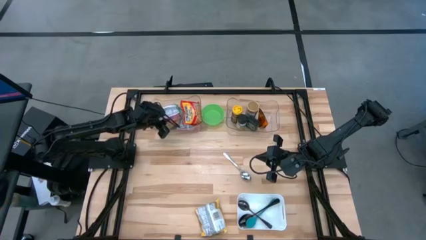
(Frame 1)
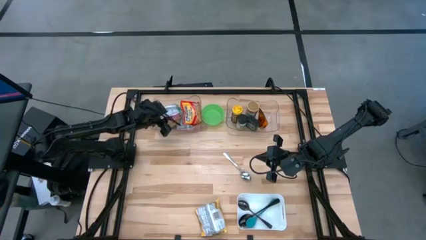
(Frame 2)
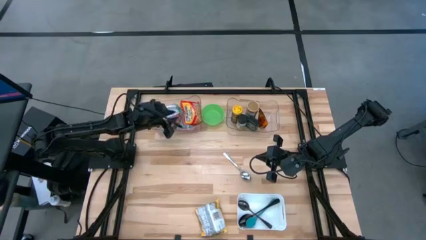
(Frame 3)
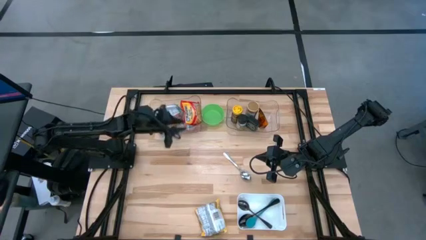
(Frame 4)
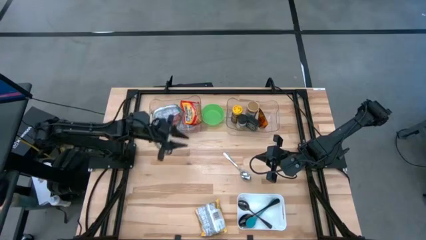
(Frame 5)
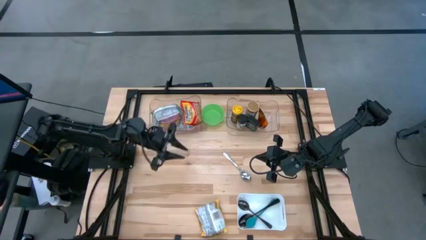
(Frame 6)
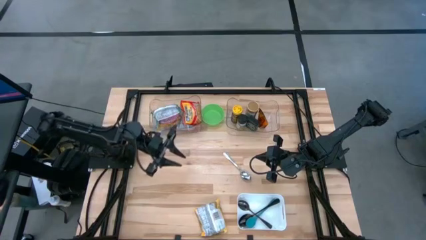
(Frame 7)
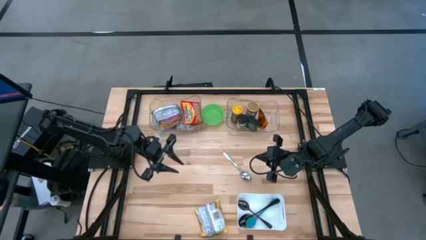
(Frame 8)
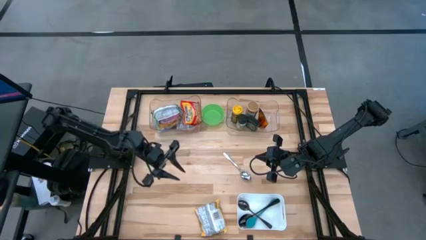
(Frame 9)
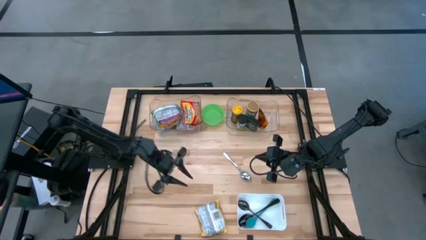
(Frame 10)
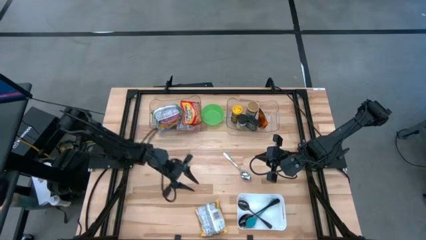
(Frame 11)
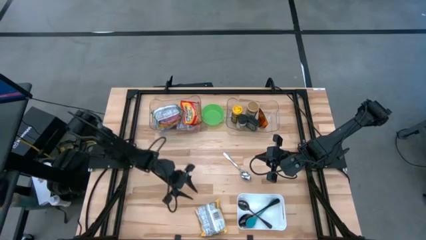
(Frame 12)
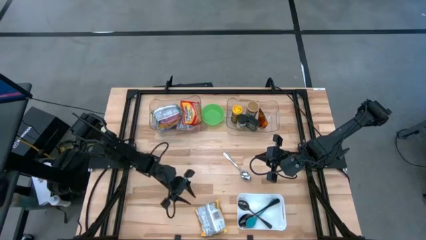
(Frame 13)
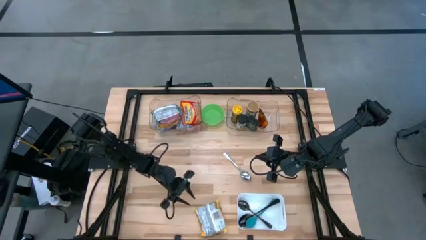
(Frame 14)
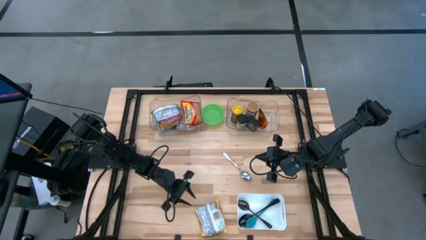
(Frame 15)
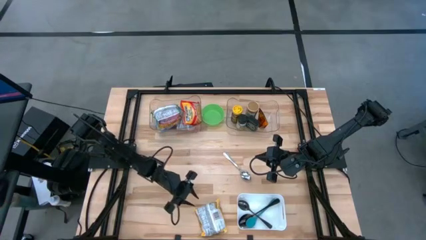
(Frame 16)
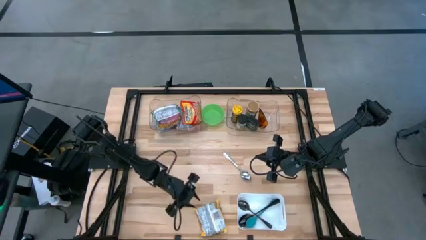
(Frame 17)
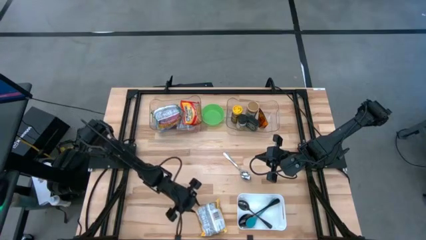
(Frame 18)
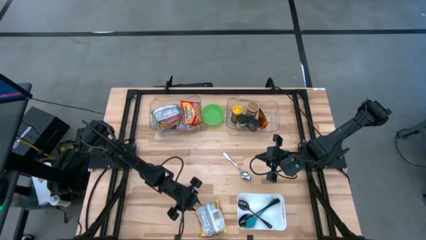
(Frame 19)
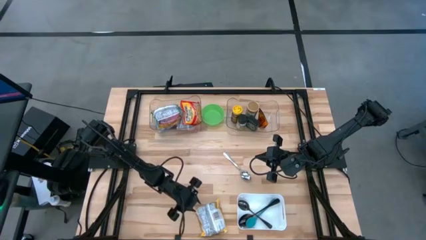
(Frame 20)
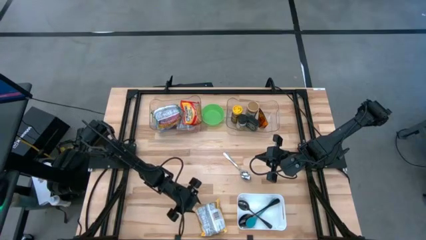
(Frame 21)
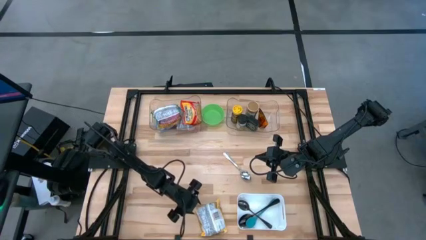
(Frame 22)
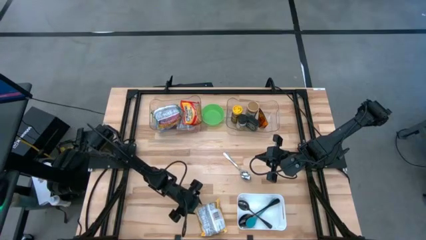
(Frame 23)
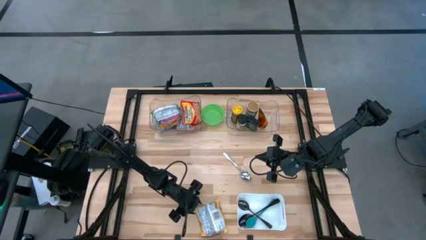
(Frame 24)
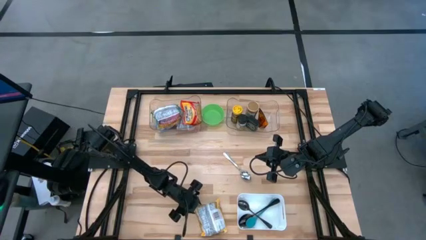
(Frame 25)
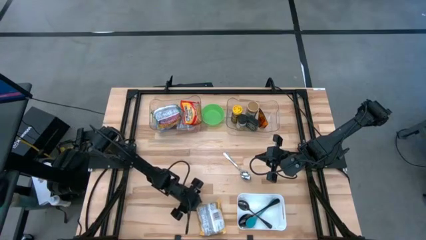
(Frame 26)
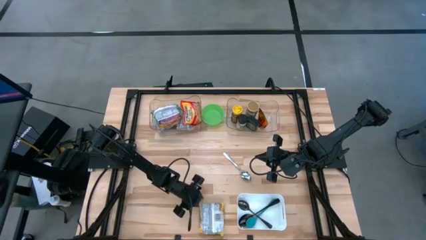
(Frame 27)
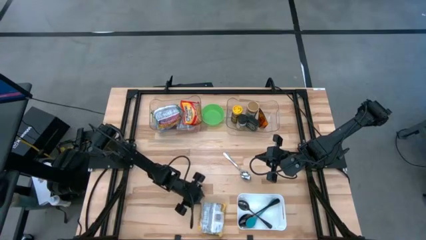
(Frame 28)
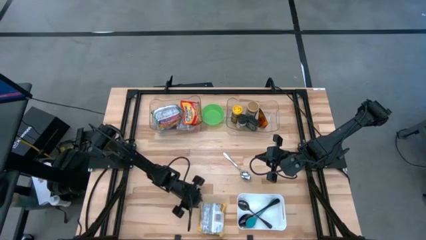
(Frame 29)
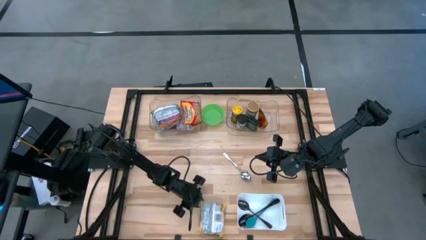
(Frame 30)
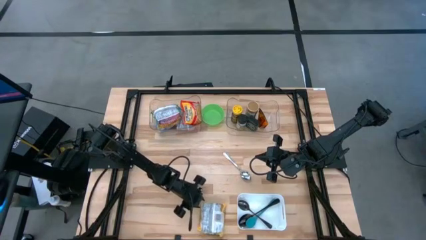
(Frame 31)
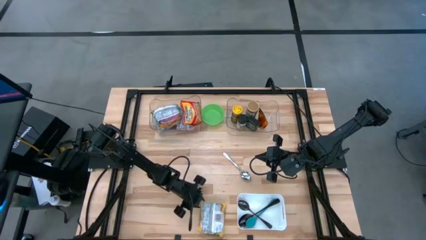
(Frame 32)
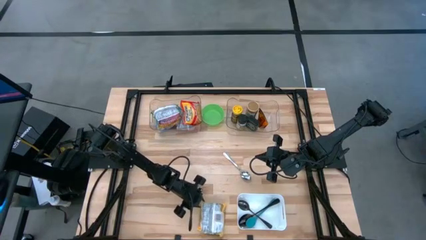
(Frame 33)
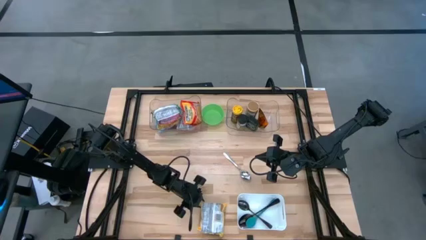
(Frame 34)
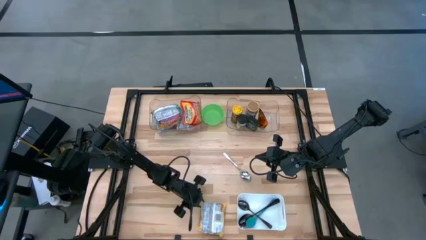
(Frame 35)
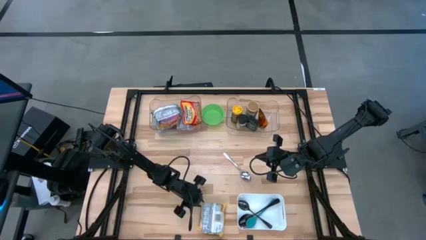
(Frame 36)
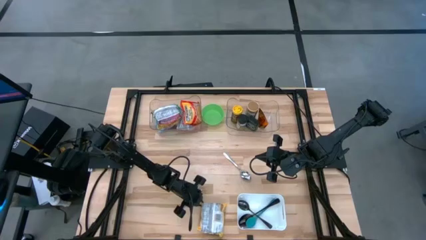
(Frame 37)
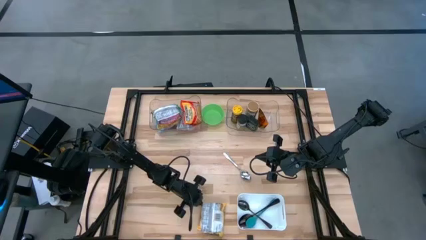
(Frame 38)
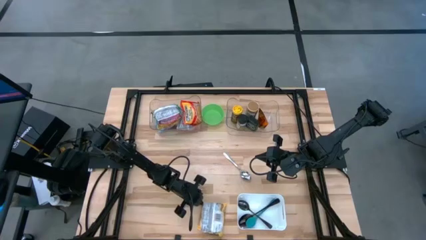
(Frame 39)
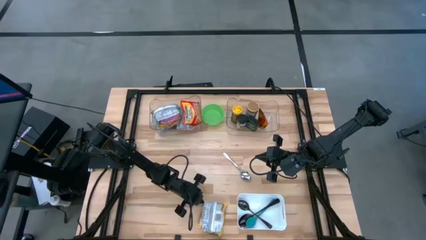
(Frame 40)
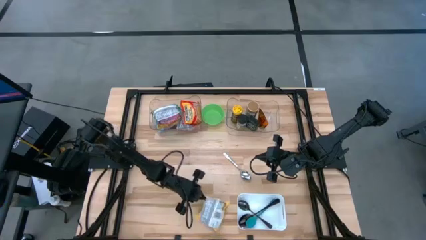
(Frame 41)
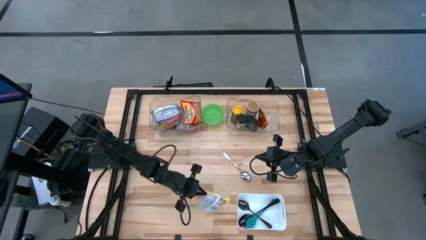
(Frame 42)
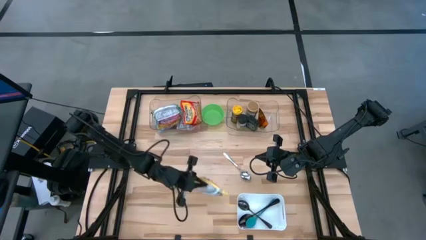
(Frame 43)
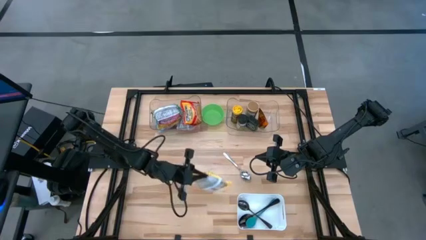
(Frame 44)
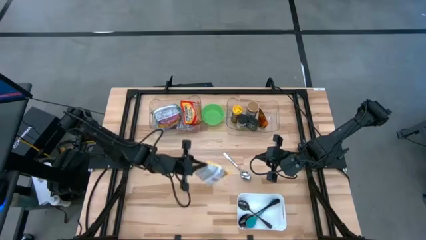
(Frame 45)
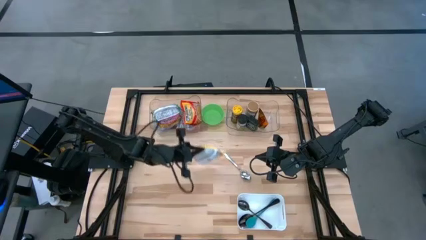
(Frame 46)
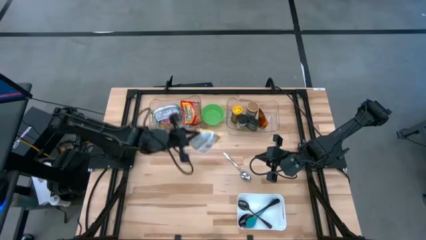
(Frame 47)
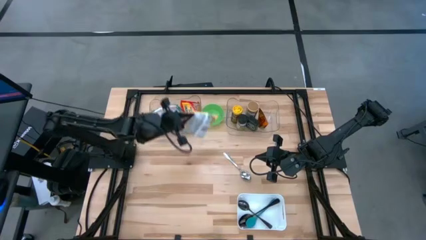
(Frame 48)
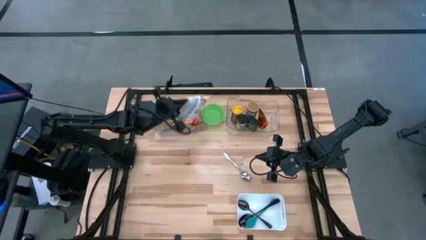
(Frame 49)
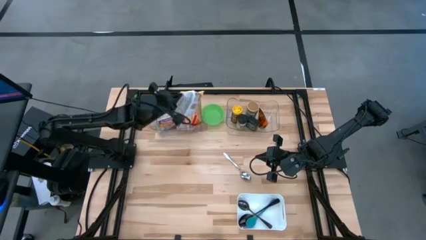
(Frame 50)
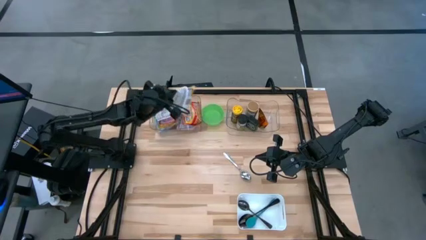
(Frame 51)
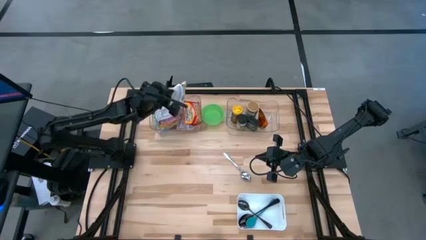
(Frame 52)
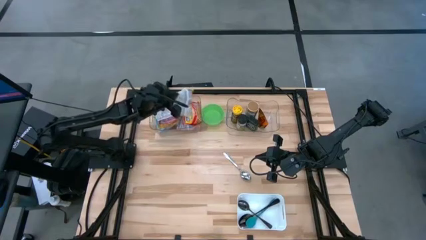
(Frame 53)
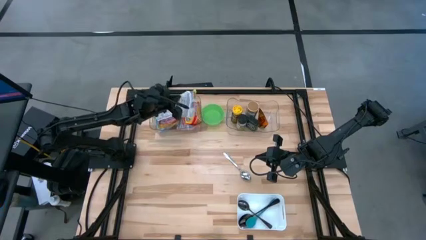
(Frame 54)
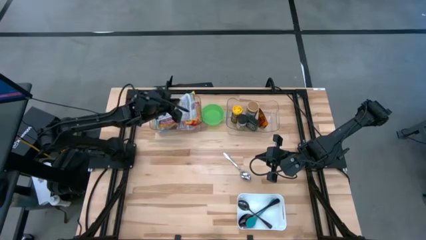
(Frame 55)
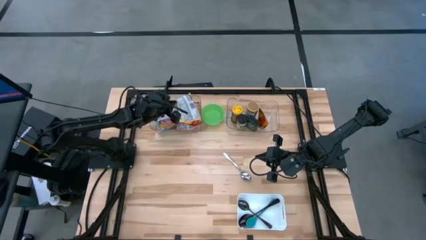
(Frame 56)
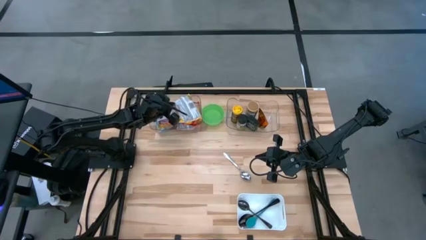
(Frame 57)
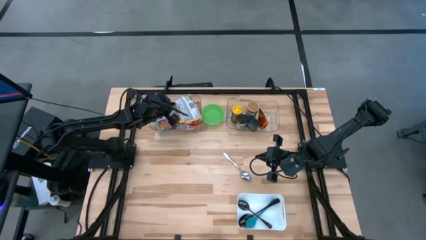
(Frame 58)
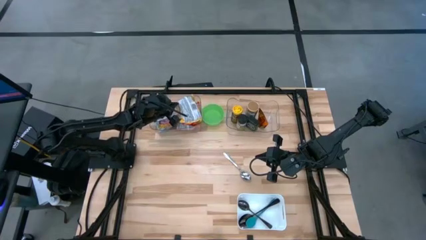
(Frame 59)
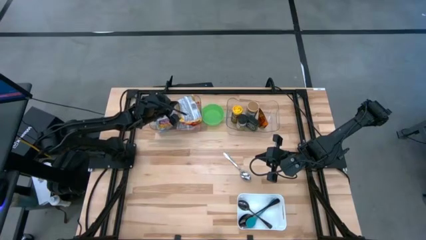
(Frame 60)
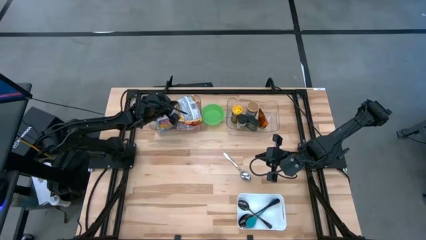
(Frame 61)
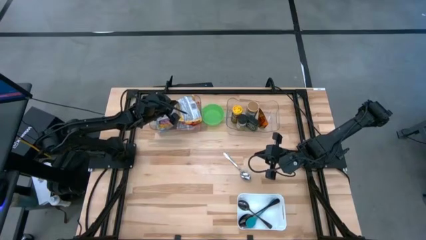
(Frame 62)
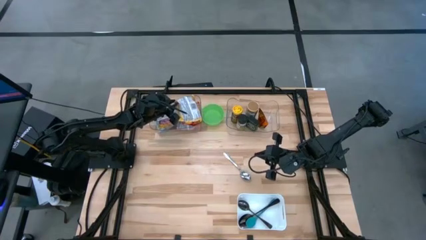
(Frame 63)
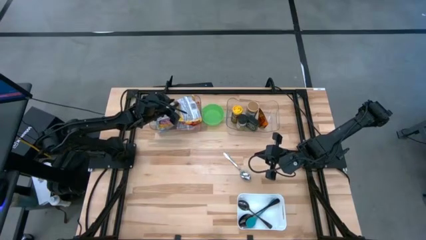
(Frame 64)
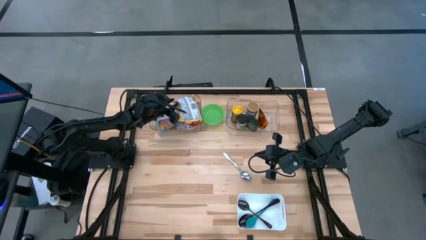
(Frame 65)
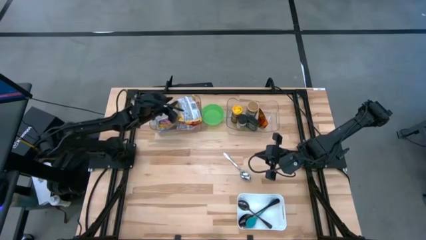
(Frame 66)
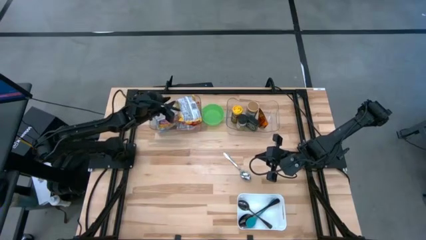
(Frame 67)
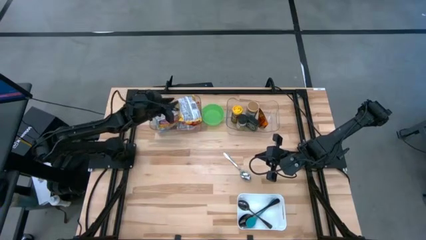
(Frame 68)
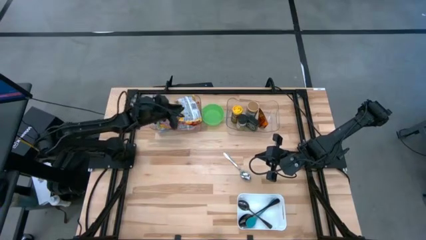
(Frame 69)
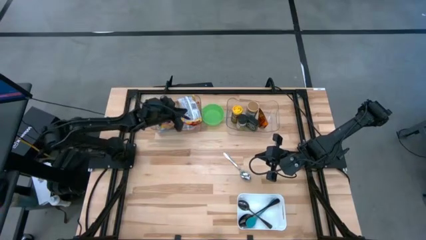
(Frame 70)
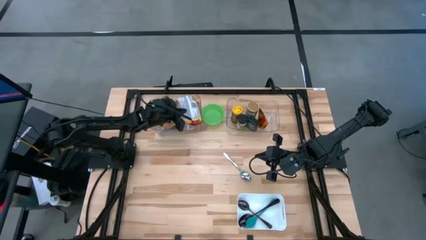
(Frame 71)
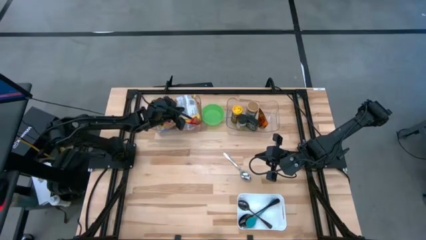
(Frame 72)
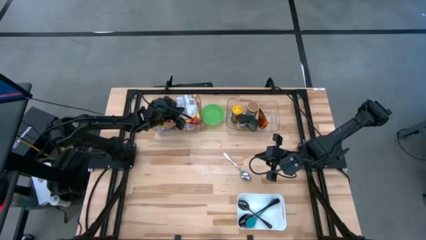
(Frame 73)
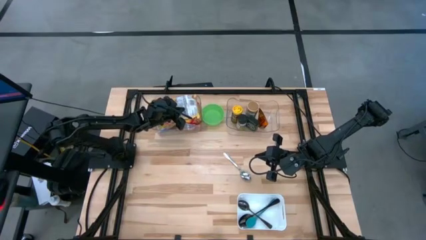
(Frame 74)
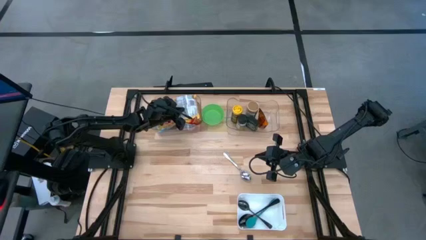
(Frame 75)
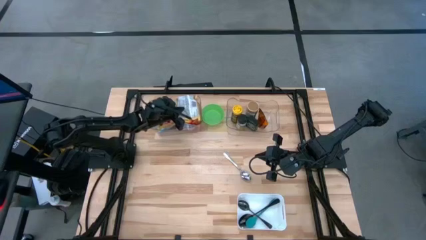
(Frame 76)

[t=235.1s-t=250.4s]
Task: Pick & Place Food Item
Put the yellow noodle pack in the left transparent bin
